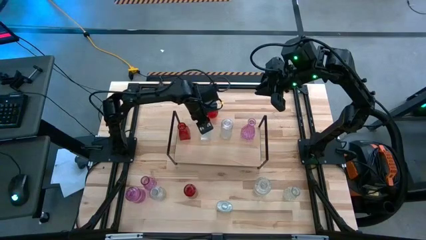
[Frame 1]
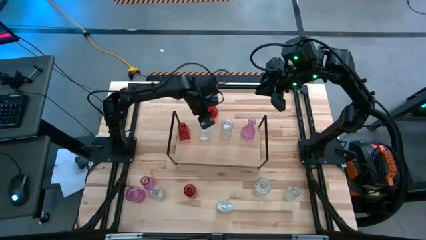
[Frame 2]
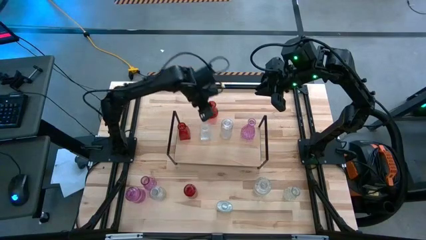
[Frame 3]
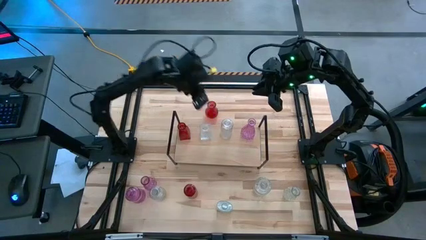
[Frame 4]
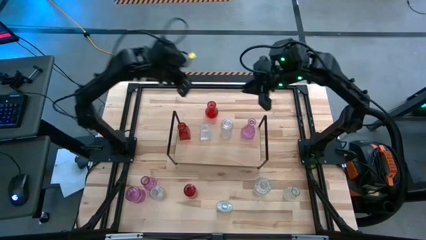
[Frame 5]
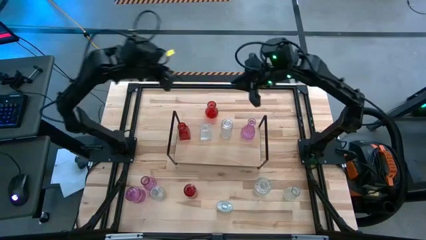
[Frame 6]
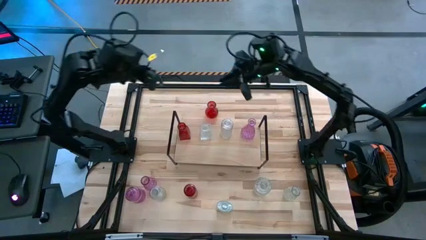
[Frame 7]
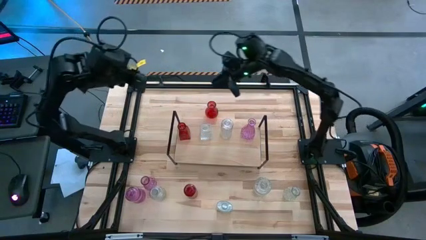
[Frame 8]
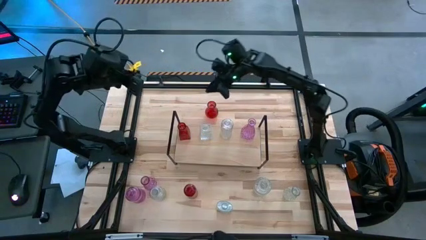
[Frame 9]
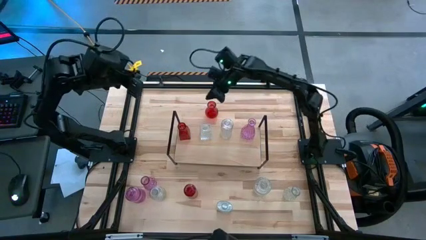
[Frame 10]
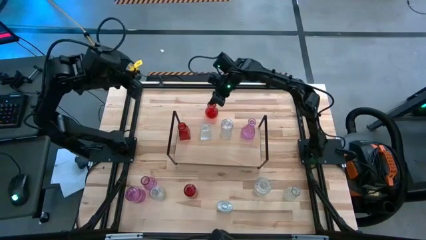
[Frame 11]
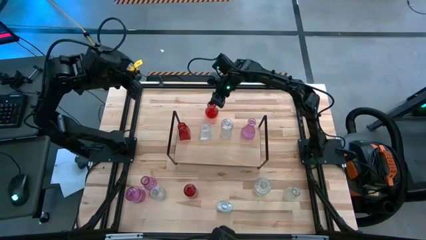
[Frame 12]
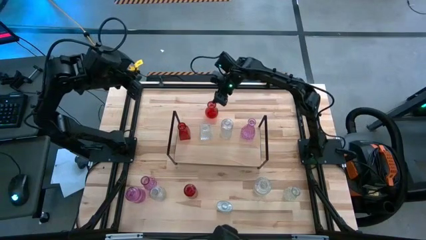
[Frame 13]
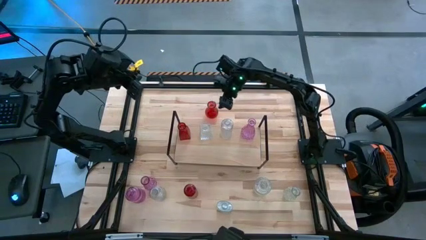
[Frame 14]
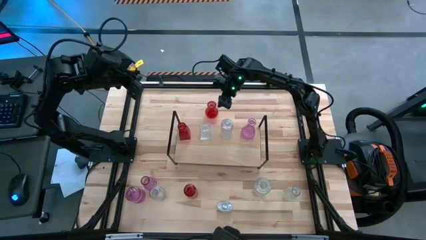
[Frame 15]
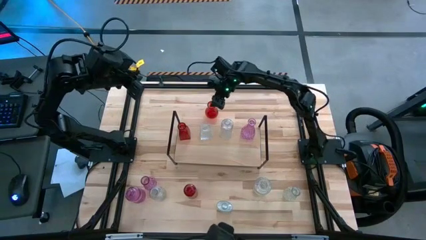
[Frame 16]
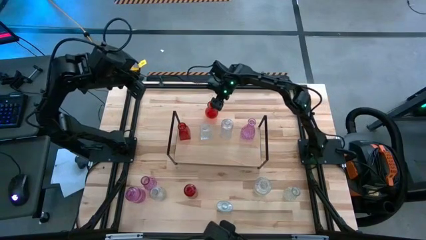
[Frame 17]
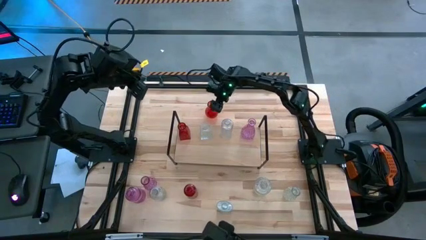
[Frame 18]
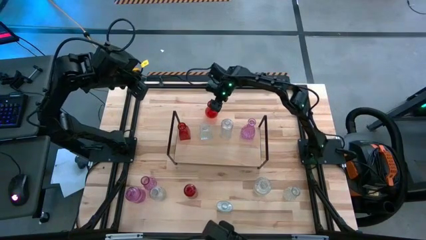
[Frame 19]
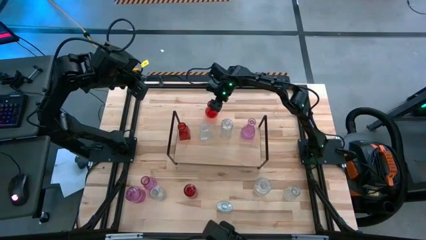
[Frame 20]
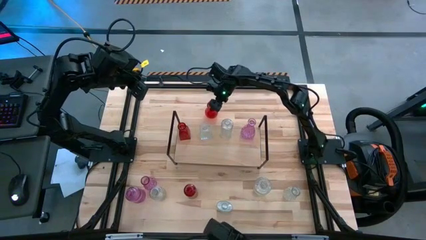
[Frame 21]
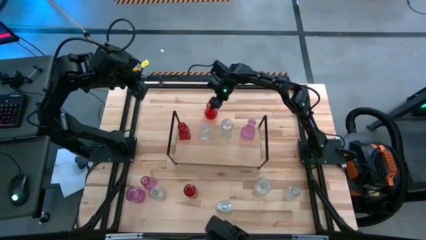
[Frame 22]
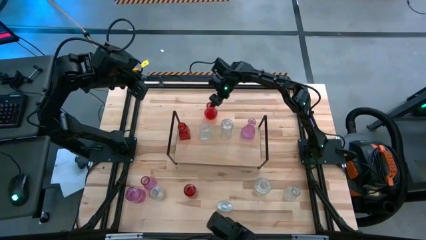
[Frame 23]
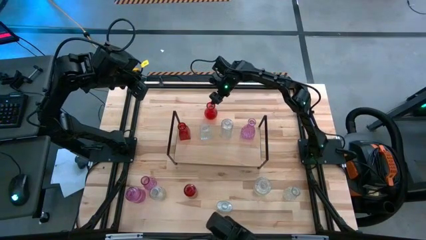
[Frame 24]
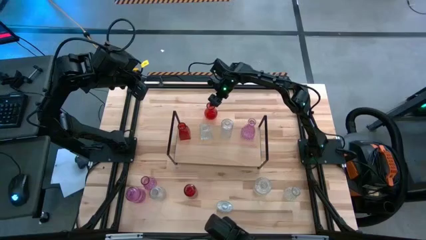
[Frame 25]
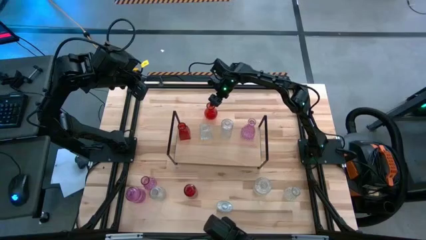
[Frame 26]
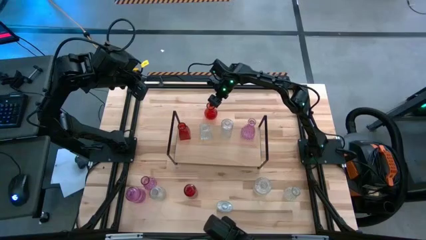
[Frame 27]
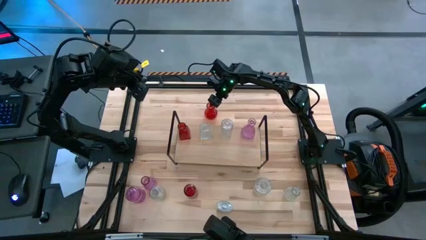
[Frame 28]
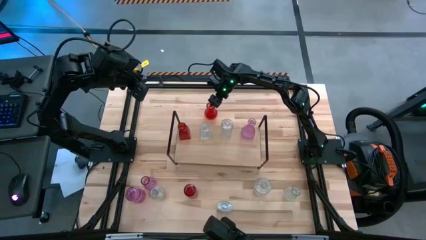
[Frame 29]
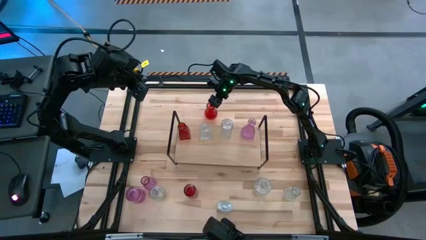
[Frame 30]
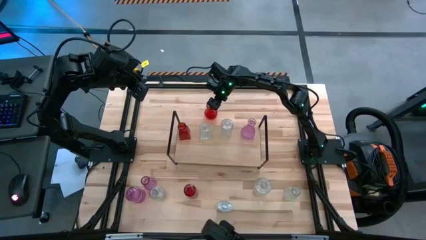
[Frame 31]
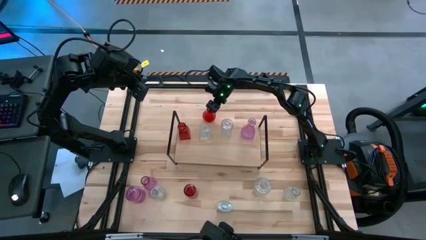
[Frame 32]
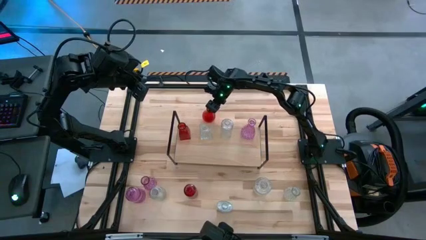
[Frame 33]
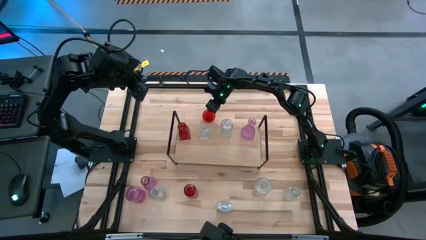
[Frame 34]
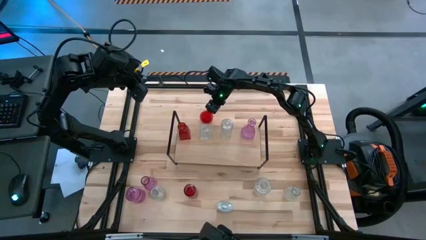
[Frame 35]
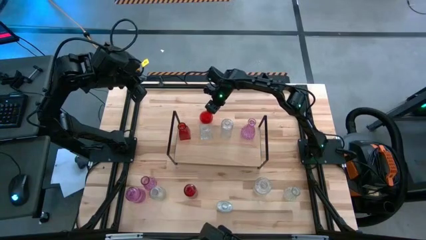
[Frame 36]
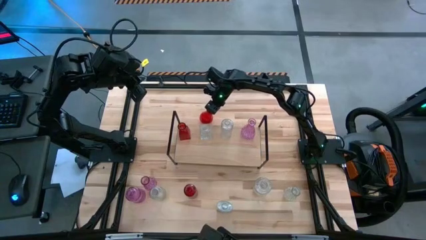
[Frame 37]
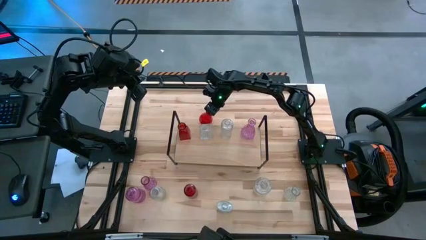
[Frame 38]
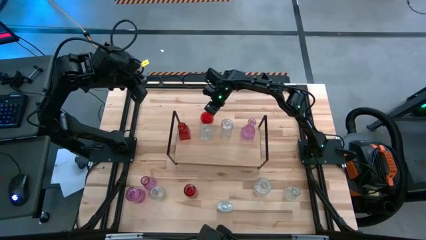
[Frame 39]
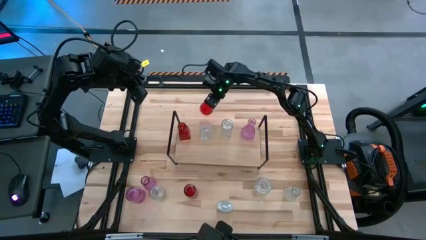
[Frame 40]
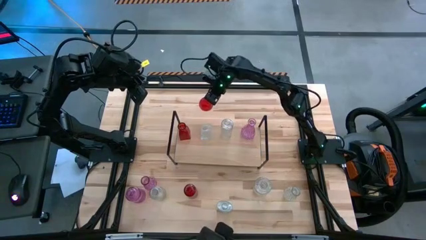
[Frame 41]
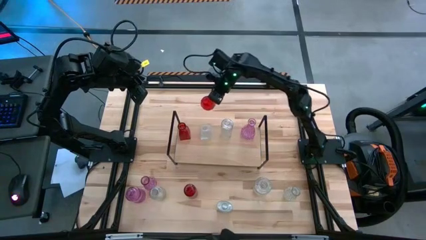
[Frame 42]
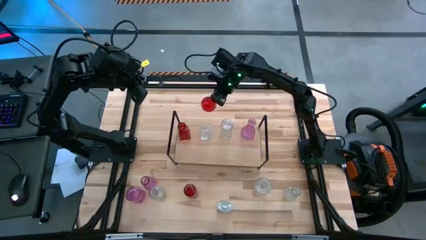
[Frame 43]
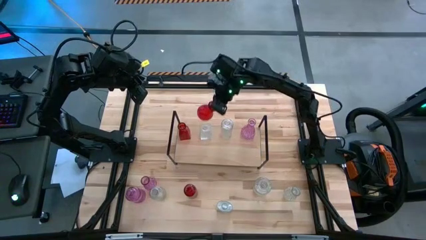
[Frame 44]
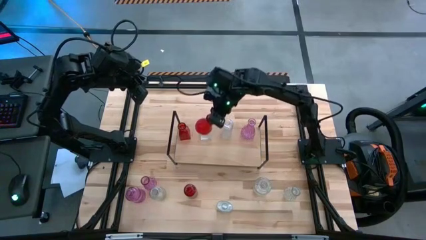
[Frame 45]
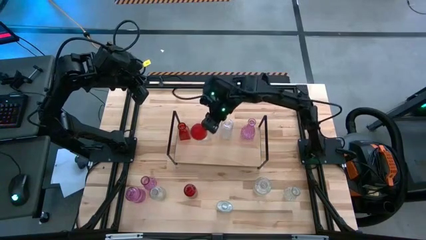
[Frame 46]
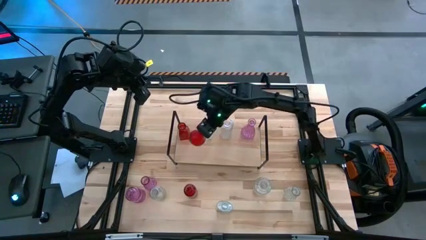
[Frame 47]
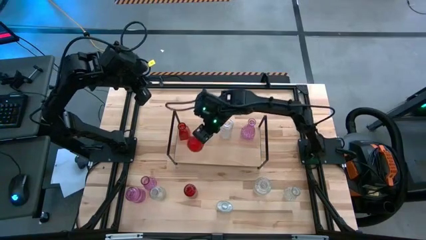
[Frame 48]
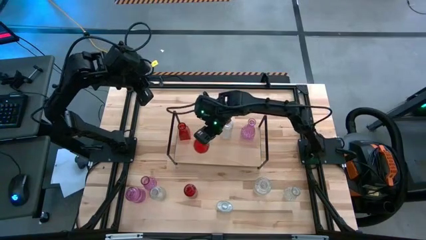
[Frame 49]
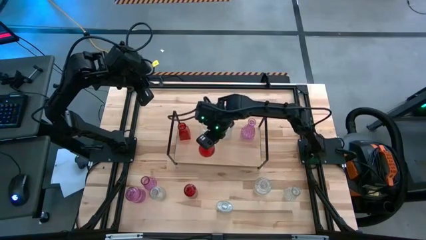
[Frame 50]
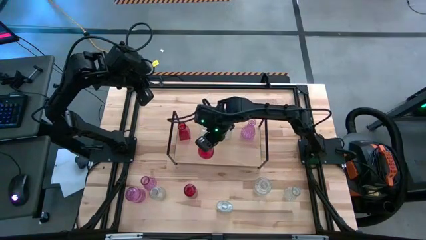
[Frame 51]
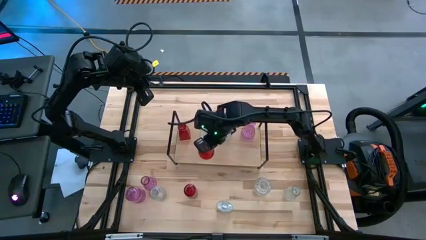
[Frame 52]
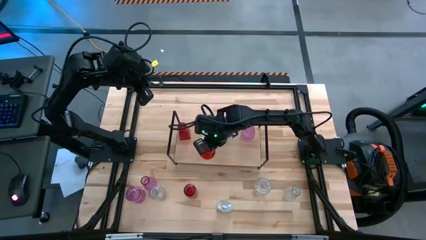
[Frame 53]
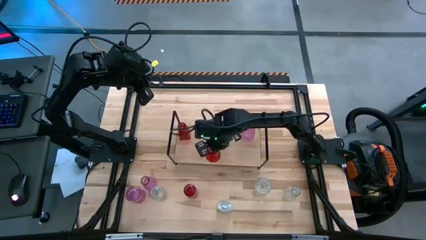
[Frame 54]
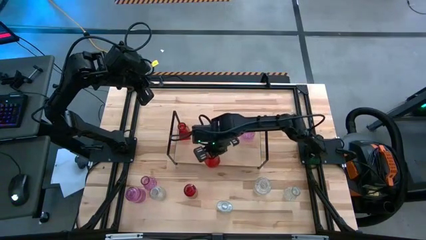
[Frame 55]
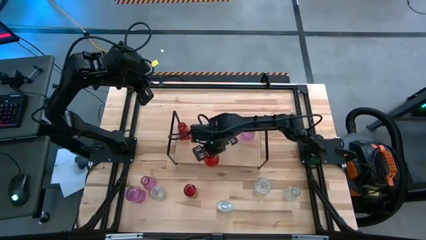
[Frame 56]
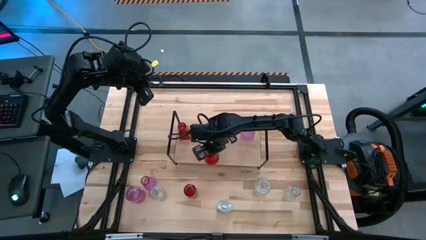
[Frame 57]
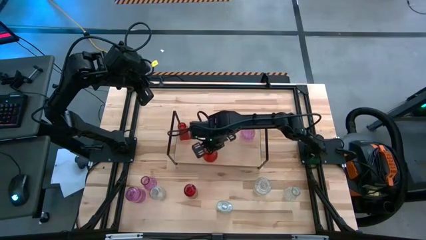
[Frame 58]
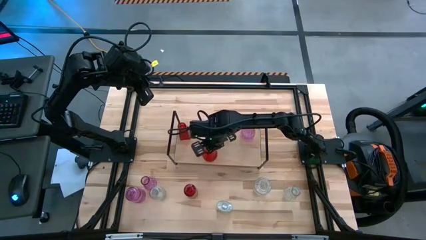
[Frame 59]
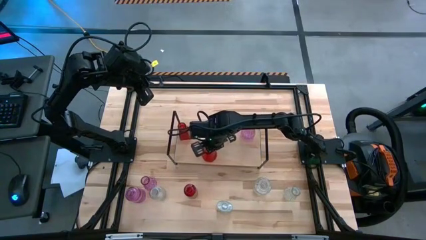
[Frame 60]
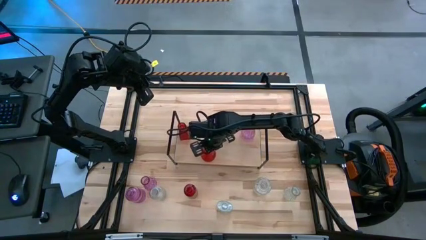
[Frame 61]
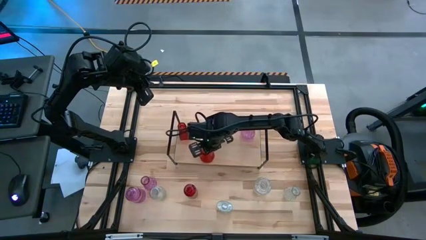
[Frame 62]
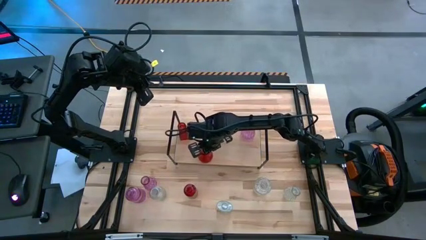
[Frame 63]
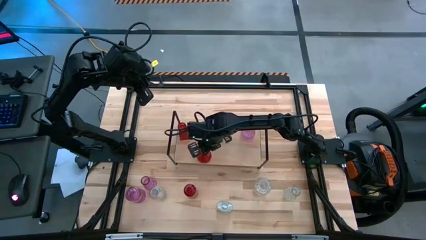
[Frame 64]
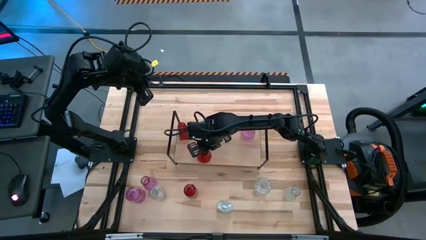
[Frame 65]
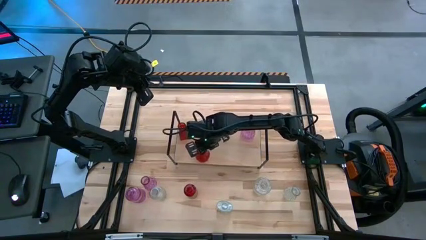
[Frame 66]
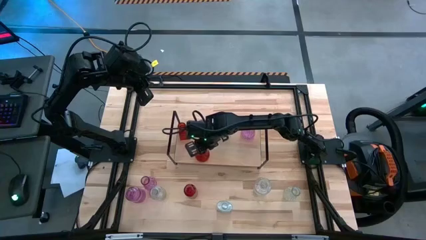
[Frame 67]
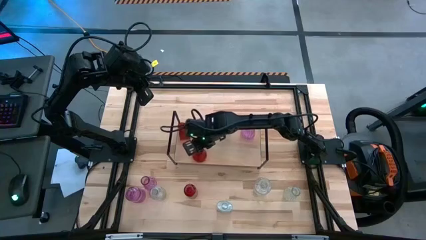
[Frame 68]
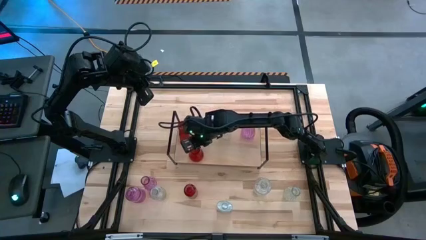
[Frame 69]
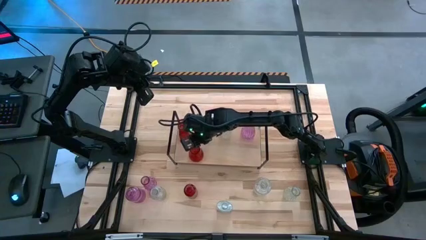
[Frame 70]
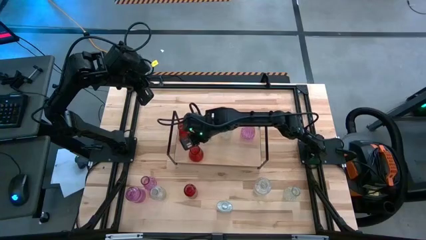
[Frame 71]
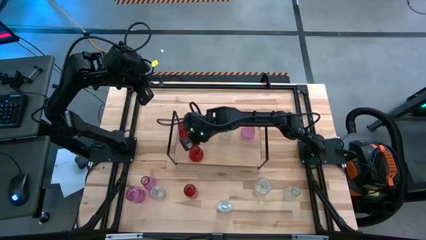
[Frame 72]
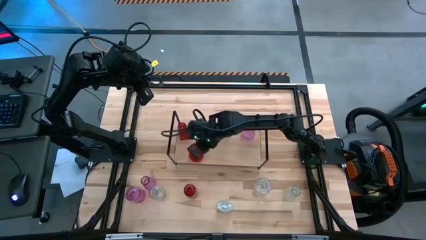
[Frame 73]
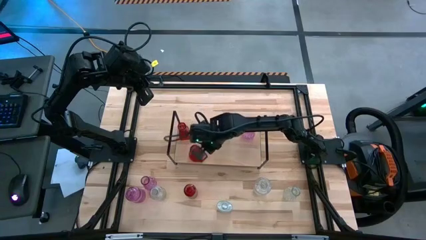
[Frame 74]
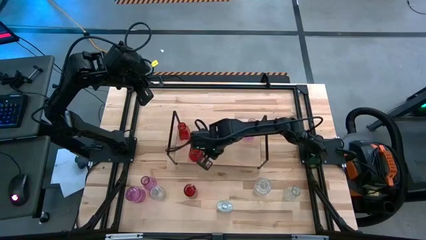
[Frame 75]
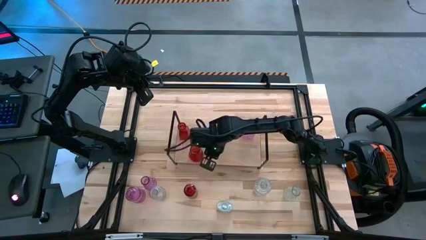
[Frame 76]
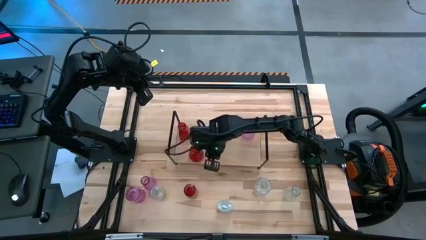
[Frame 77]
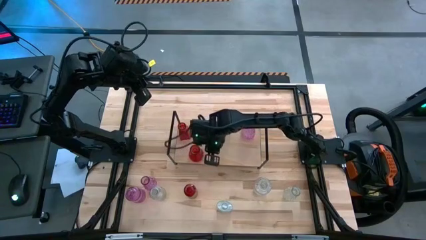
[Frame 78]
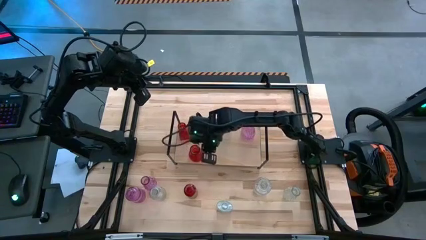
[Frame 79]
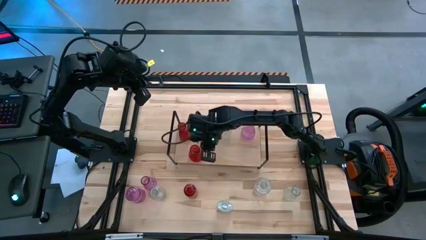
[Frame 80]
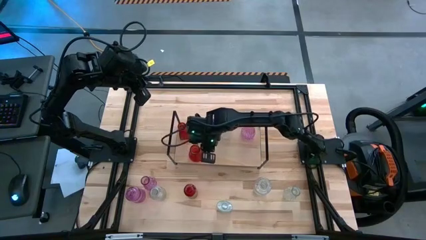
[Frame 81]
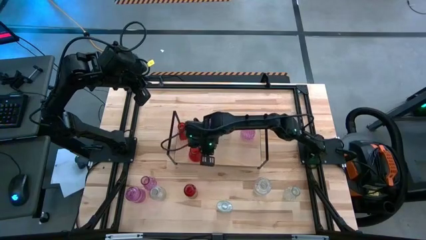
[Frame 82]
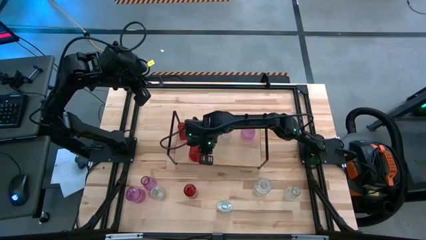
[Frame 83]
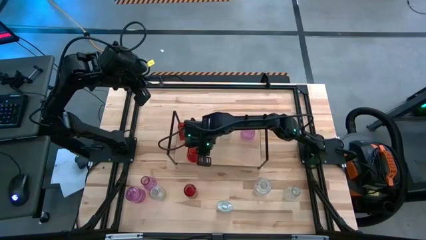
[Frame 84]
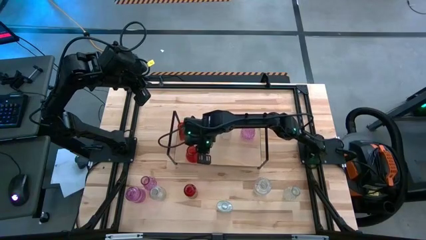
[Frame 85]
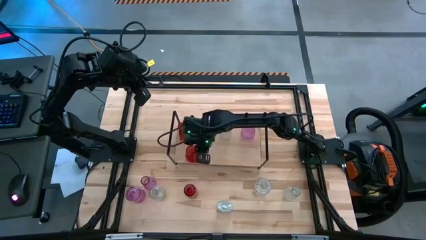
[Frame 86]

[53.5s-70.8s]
Task: sort vases onto shelf
Put the red vase aligned with the other red vase on the shelf
